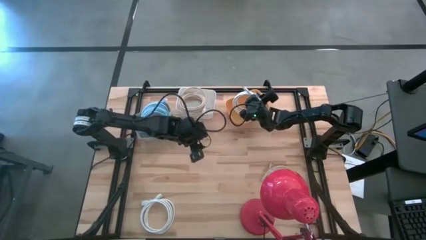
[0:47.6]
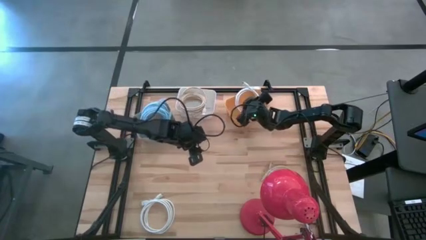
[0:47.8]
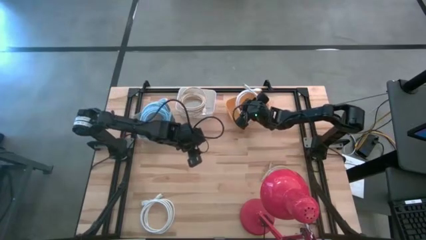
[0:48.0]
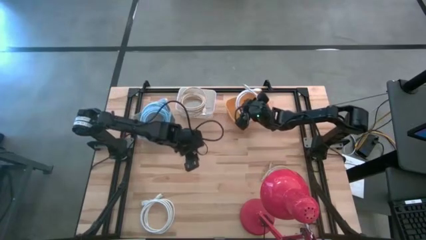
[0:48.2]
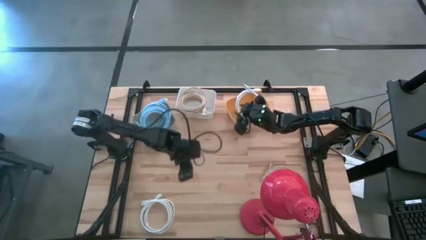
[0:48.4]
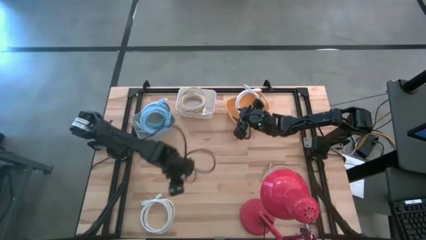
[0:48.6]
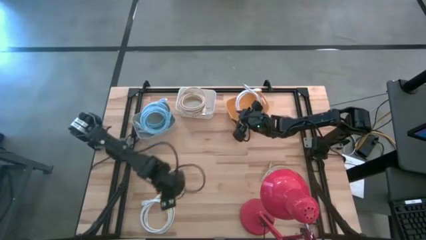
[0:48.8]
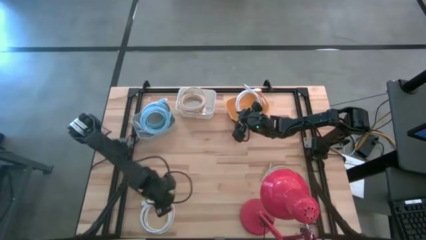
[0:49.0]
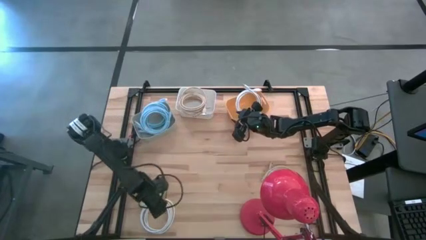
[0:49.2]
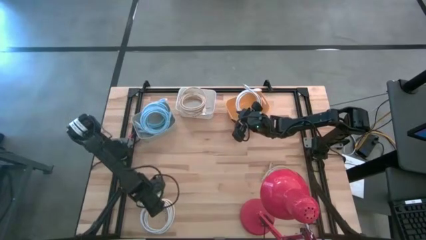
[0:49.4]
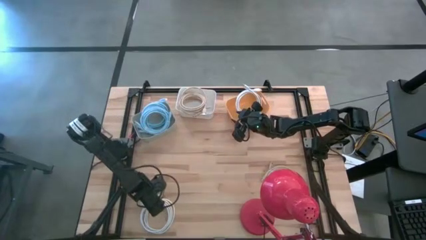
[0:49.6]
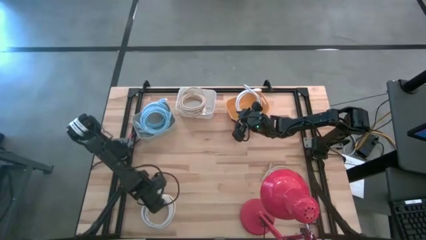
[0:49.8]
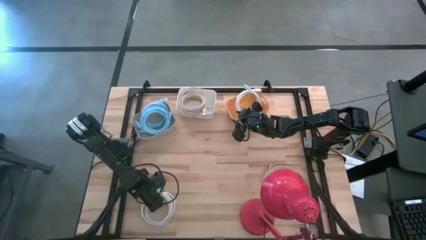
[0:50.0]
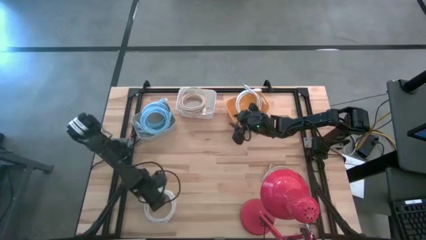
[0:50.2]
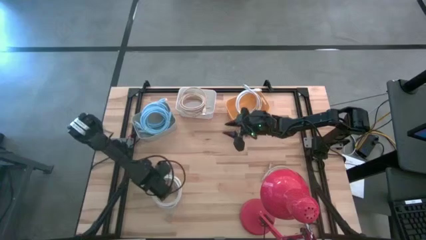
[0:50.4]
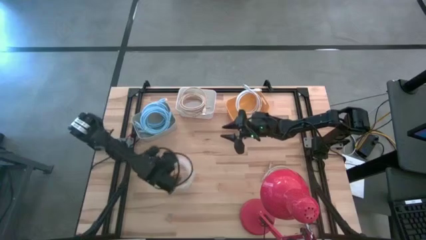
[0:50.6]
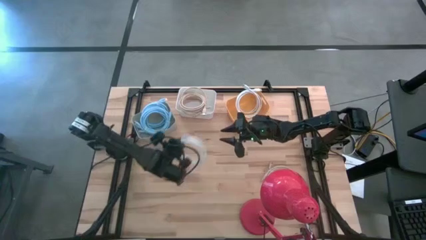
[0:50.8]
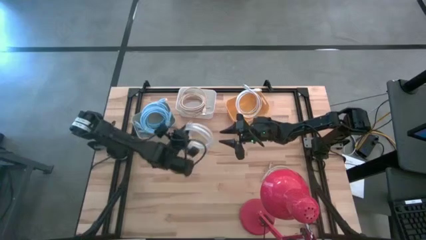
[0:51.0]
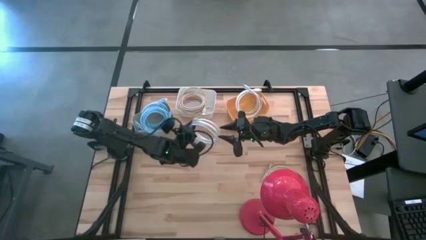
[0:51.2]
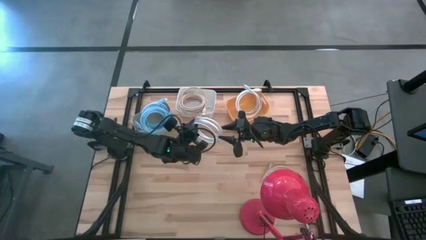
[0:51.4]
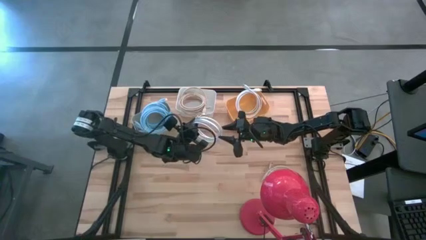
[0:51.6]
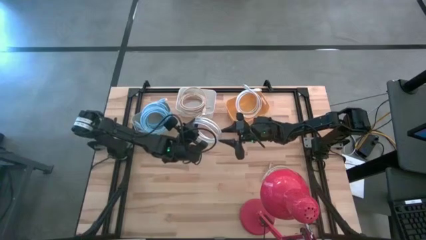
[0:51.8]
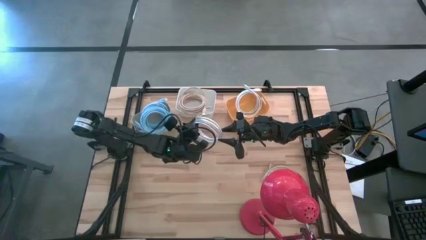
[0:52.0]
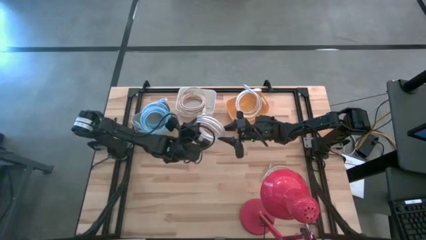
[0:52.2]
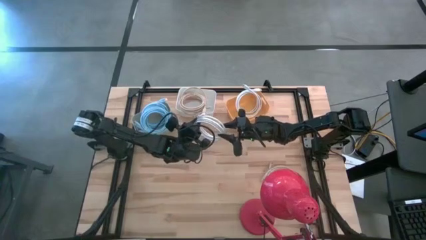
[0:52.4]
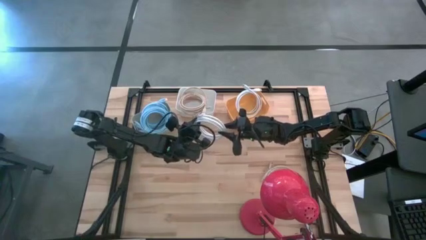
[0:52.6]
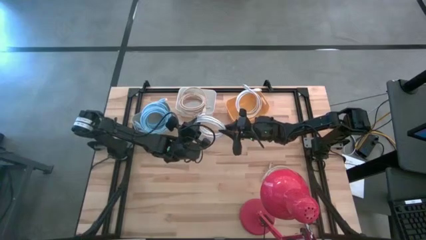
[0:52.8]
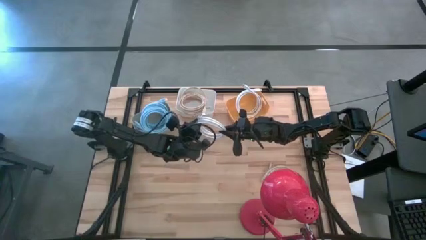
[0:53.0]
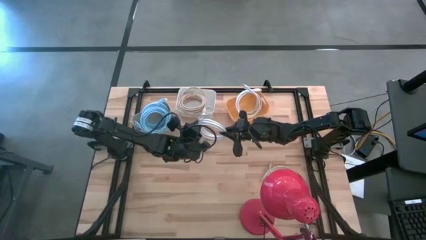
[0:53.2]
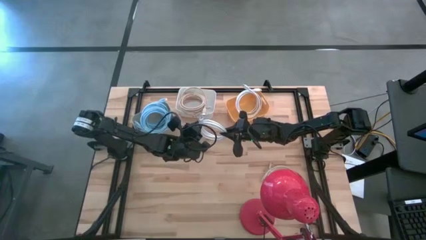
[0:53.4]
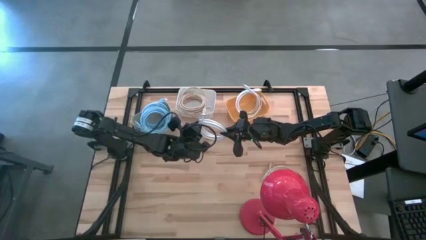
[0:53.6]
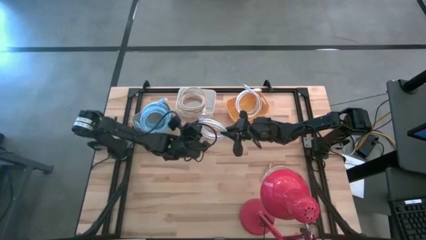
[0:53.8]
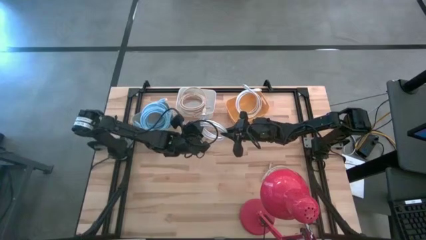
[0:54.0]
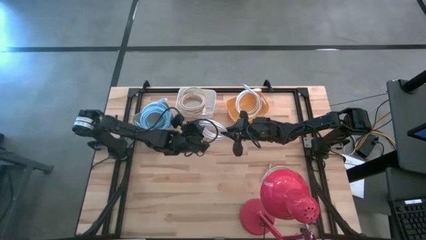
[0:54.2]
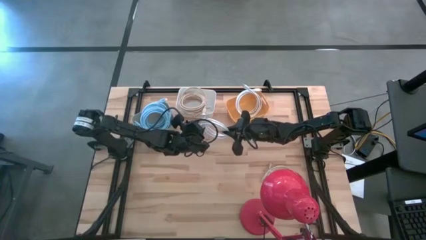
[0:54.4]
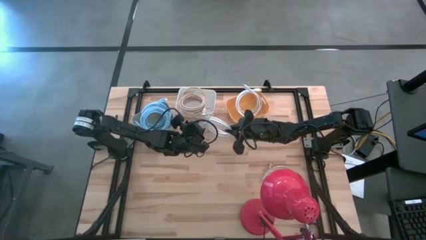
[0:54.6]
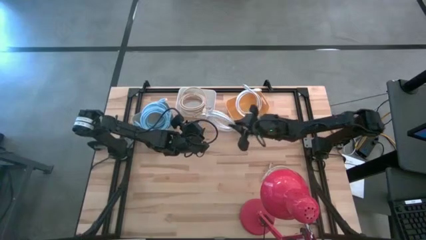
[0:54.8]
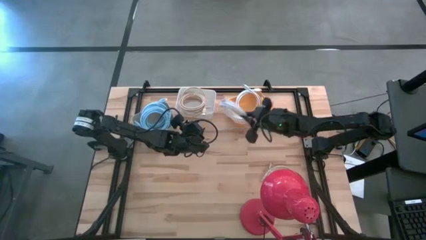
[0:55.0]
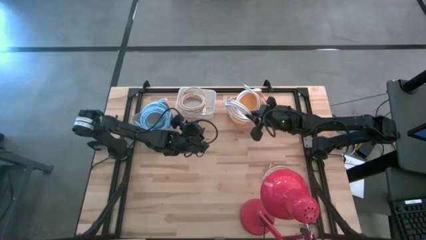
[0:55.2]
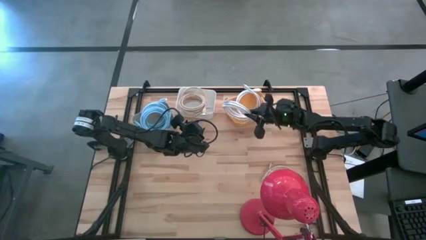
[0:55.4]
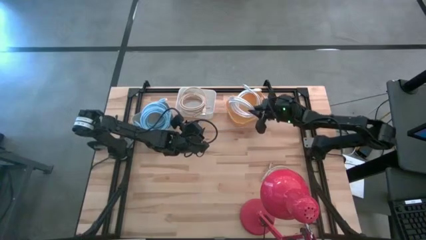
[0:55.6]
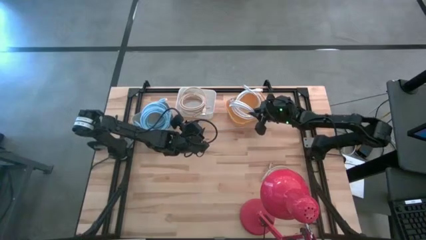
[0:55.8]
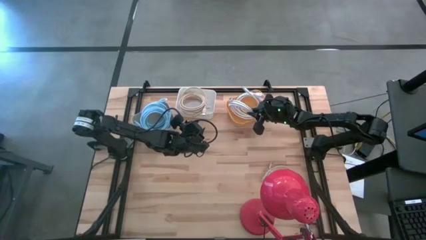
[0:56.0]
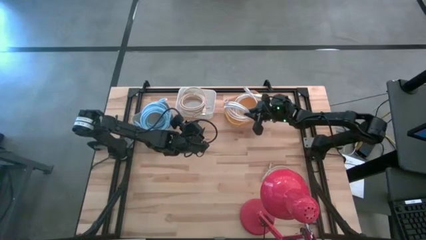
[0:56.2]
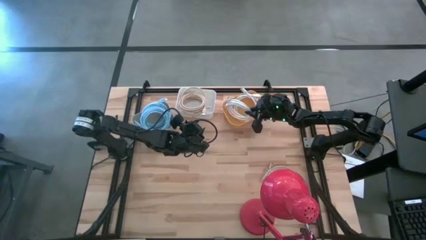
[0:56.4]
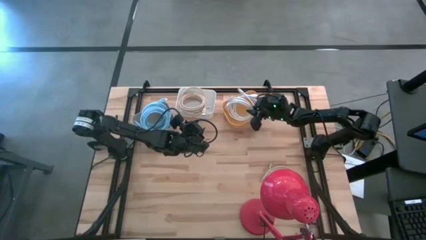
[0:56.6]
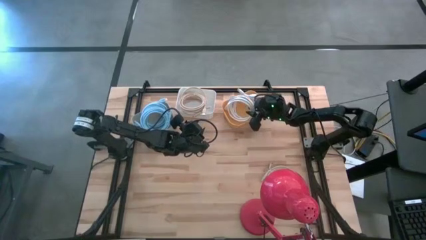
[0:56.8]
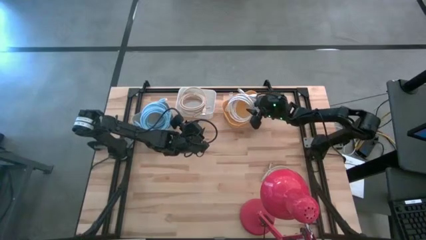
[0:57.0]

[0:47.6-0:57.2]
Task: Pick & Place USB Port
Put the white USB cable into the yellow bin

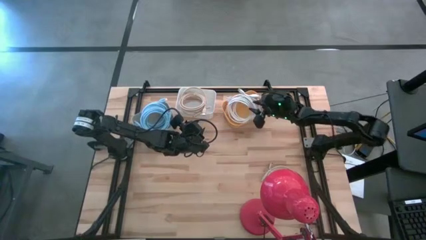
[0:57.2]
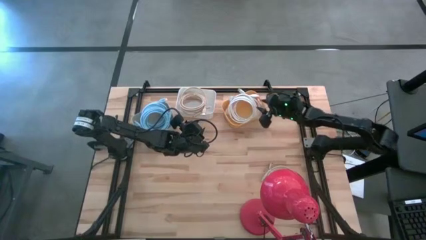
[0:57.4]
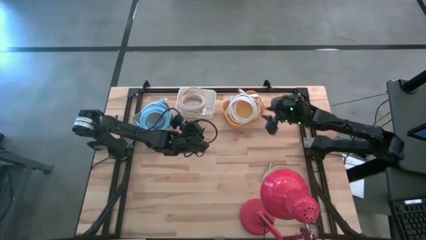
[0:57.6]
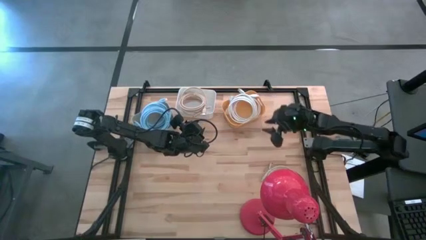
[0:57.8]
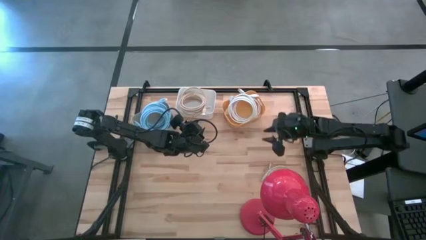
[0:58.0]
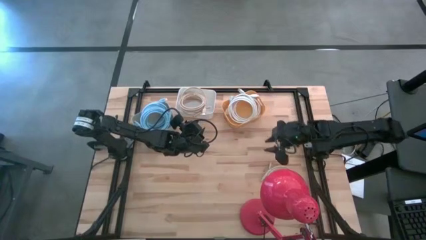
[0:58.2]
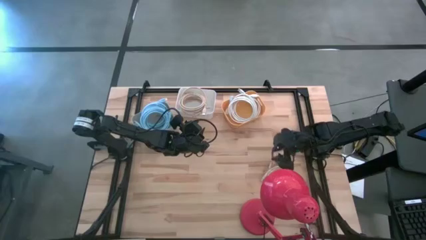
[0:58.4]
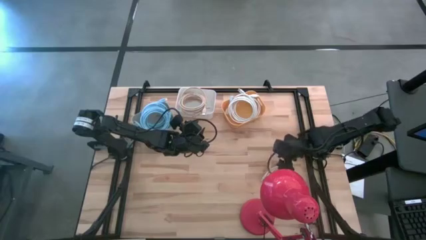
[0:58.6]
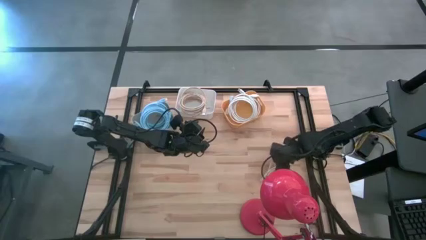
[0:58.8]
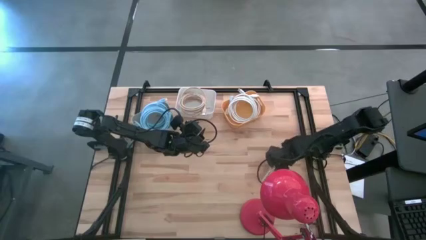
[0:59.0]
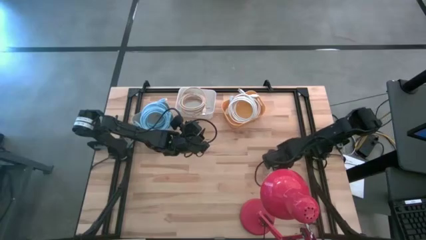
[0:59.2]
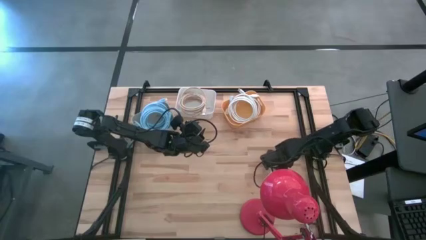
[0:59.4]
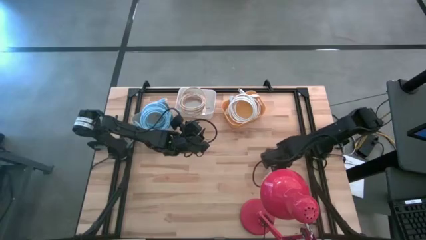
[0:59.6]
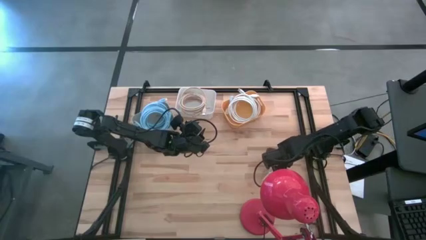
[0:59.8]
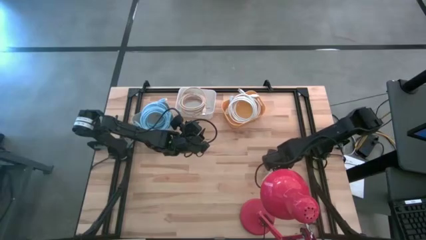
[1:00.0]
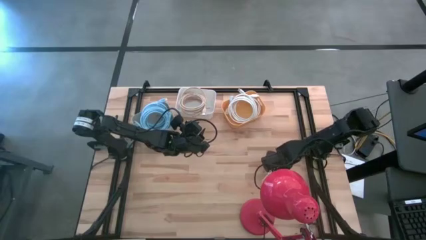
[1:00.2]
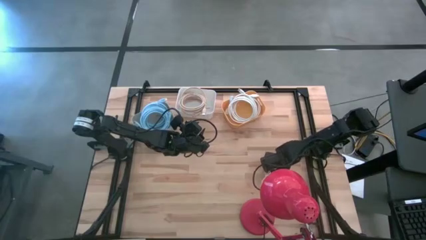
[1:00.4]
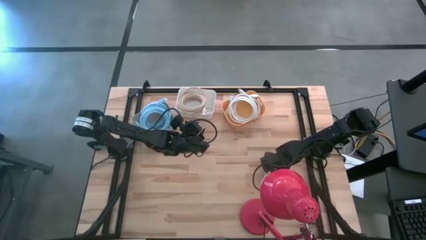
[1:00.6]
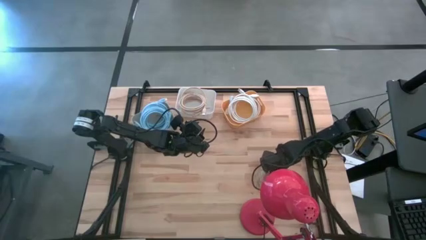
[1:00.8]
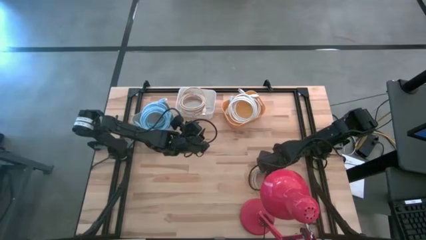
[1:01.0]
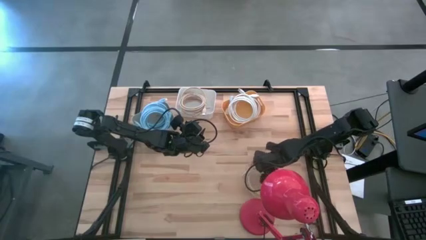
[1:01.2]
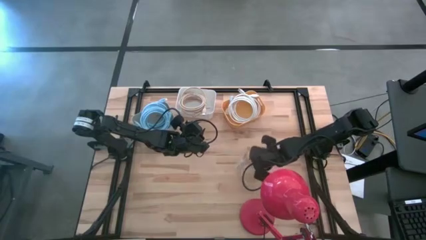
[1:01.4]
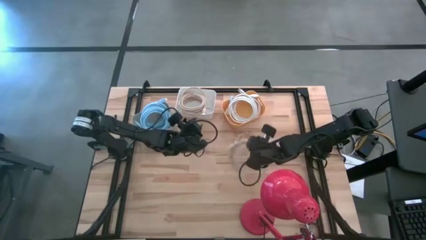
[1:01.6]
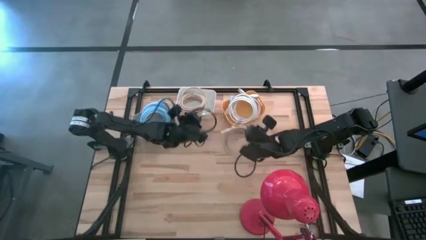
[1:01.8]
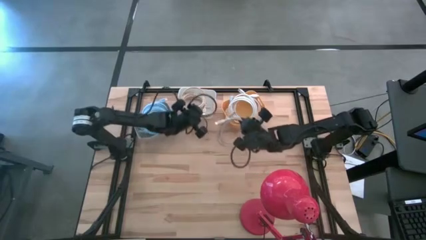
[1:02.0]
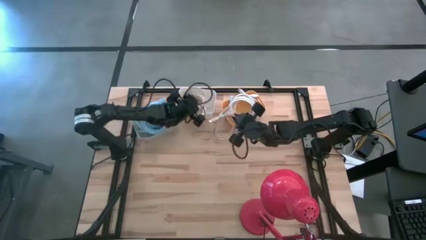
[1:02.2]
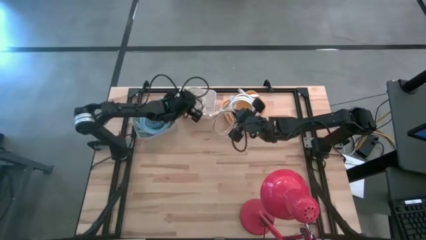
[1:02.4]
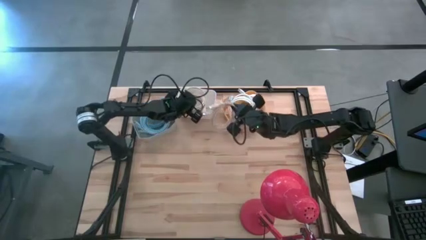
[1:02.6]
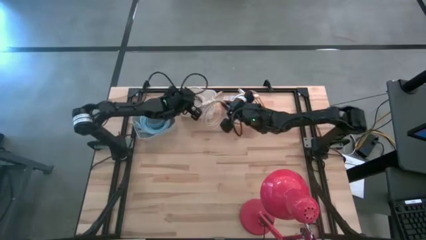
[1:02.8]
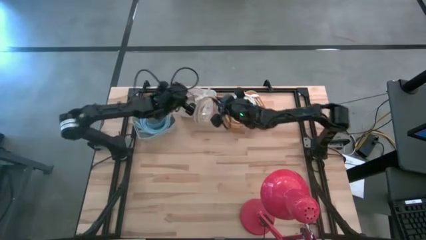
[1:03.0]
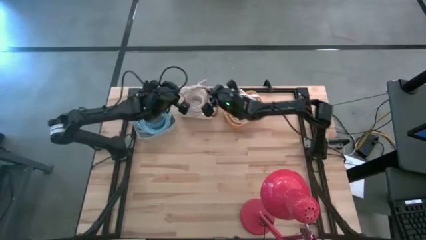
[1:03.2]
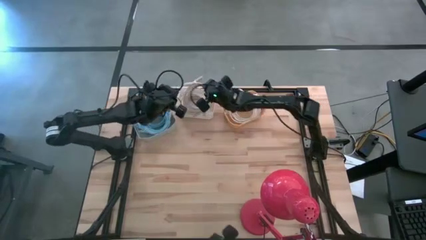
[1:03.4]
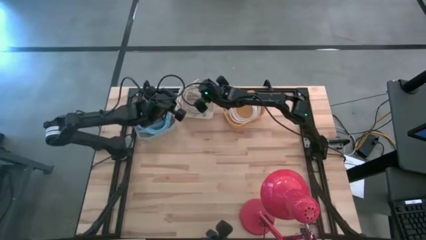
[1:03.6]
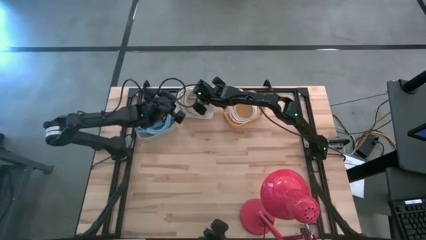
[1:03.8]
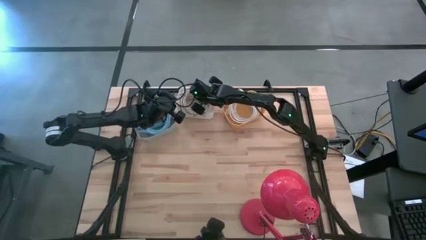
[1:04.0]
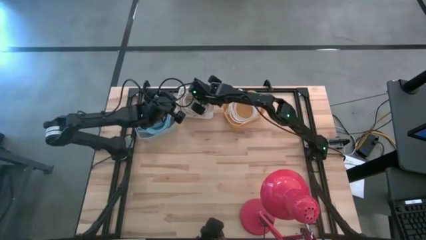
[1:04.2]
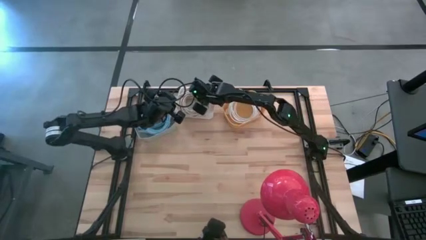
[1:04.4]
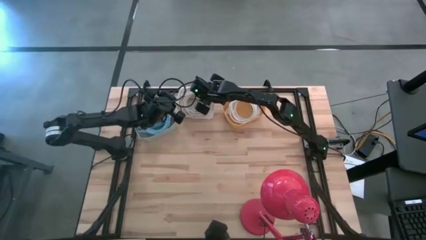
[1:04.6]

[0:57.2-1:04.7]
Put the brown USB cable into the white bin
